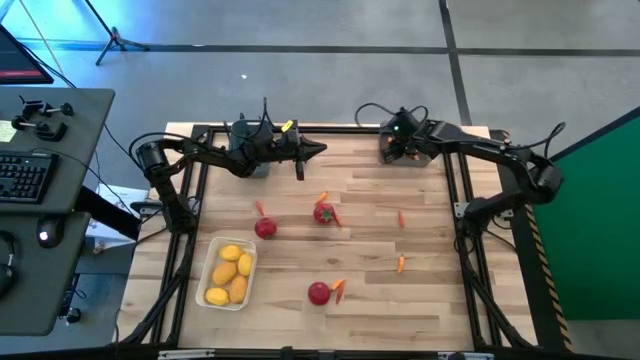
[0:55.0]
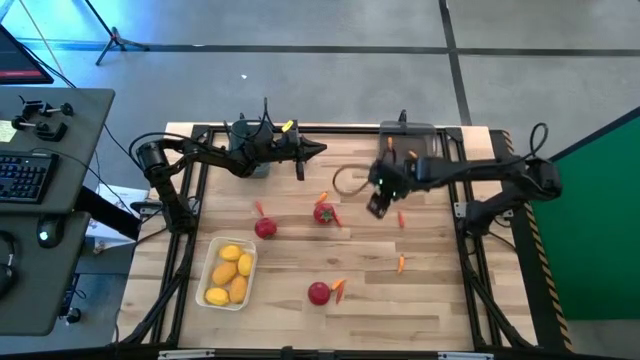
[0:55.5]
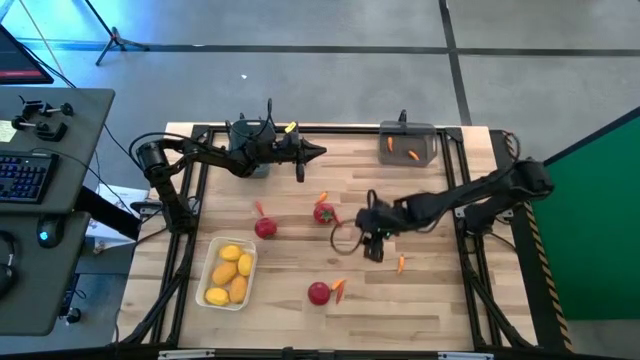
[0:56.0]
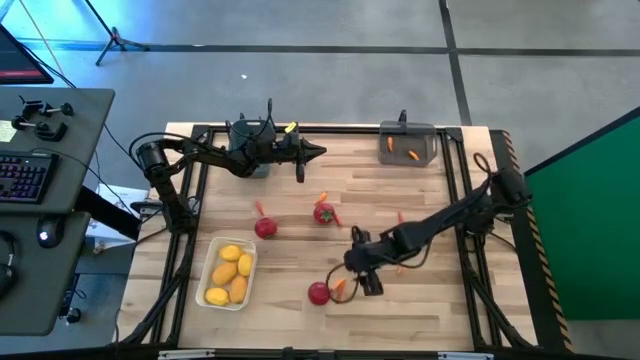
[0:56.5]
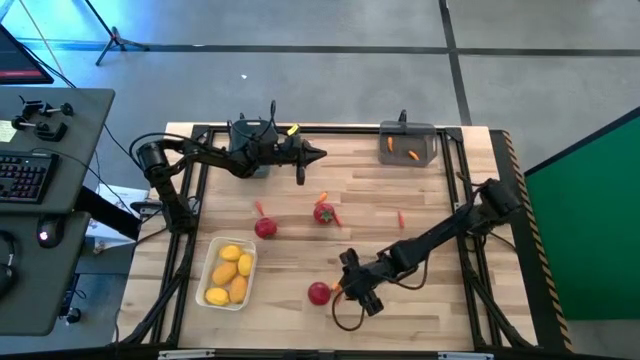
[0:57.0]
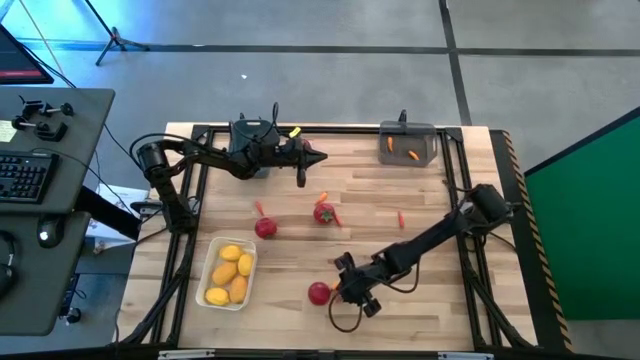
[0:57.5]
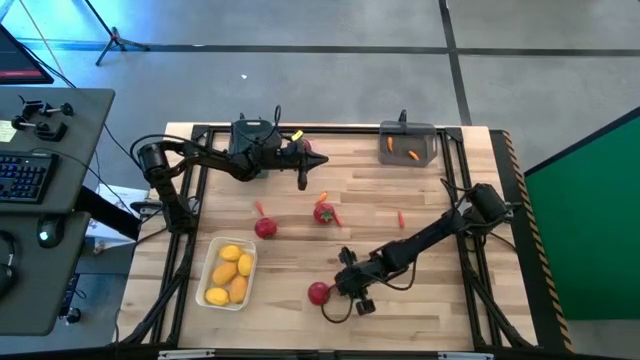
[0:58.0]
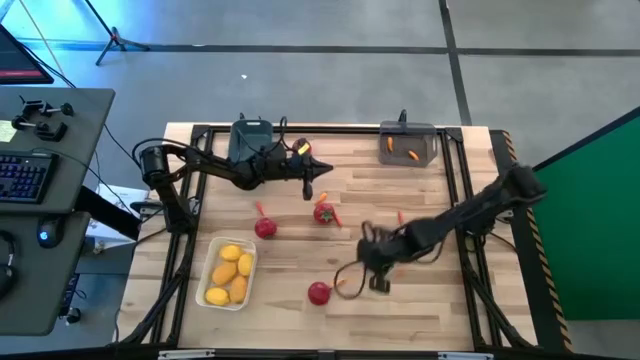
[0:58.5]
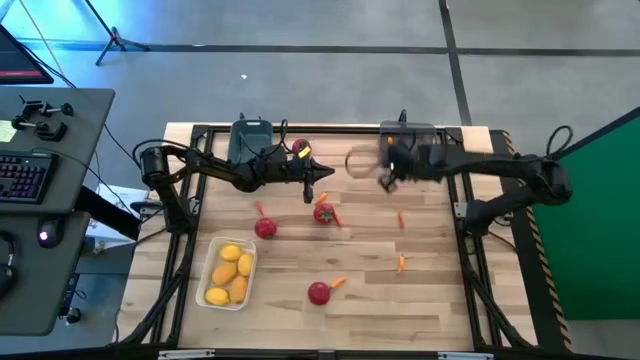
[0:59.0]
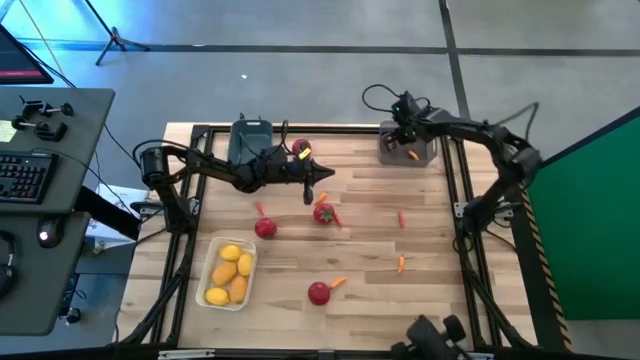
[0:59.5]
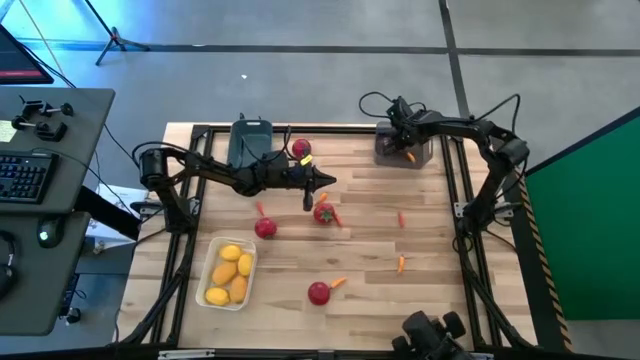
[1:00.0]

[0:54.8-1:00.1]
Task: Sort produce into baskets
Put the red chili pepper into the black bin

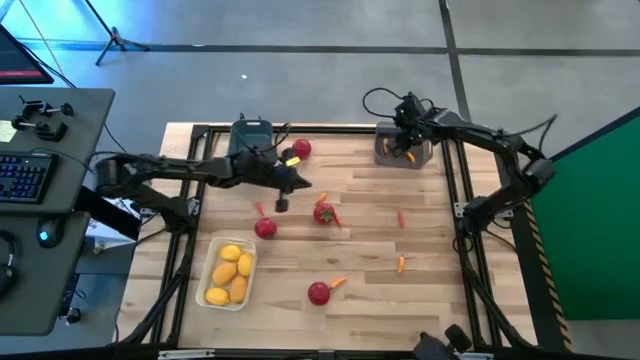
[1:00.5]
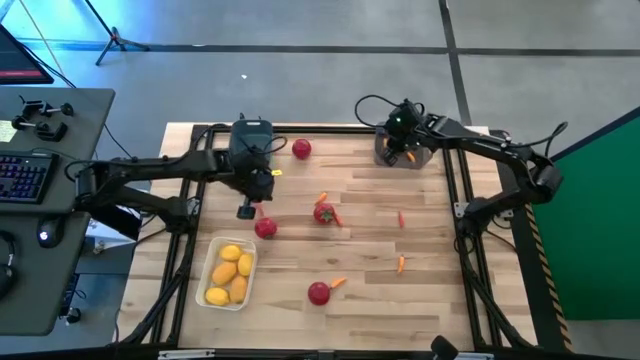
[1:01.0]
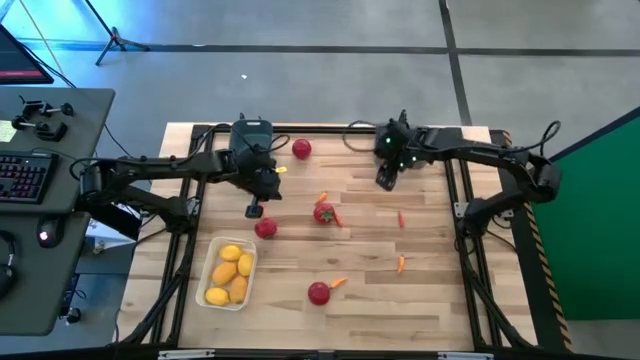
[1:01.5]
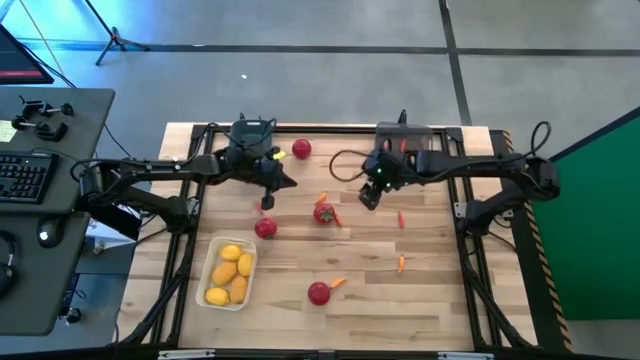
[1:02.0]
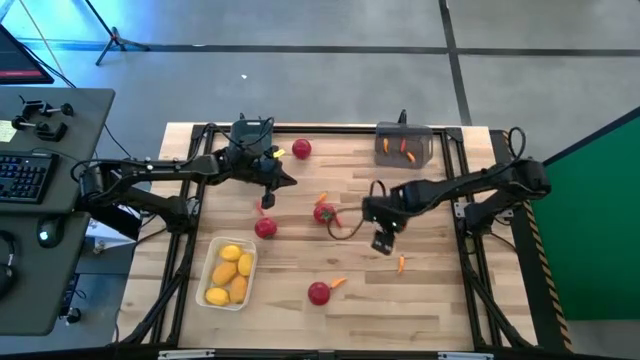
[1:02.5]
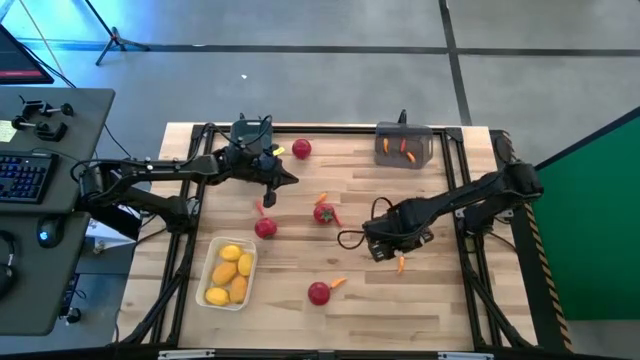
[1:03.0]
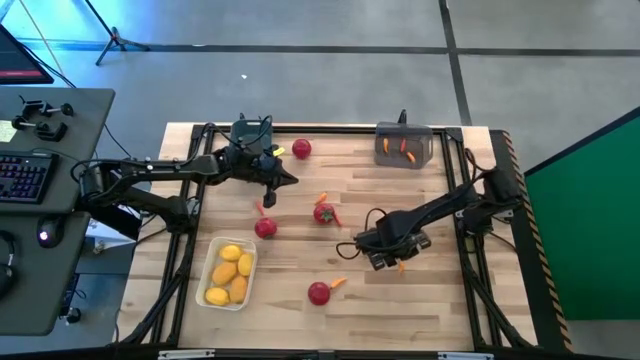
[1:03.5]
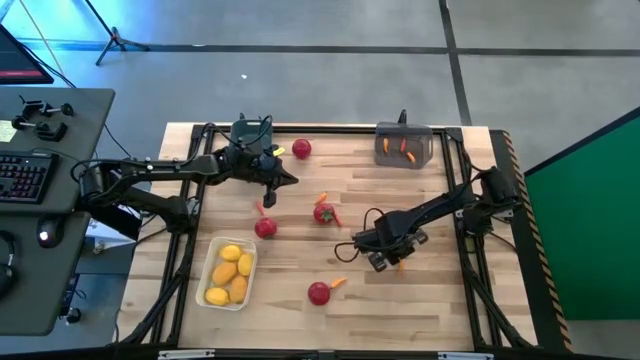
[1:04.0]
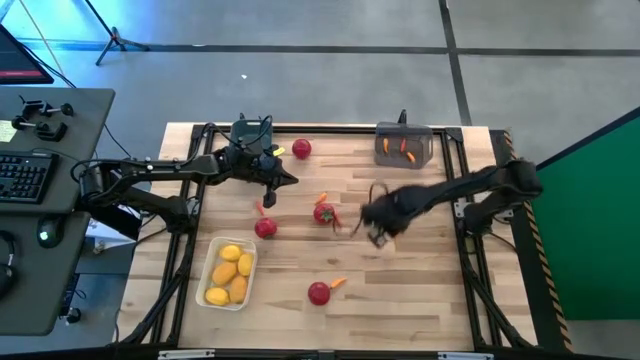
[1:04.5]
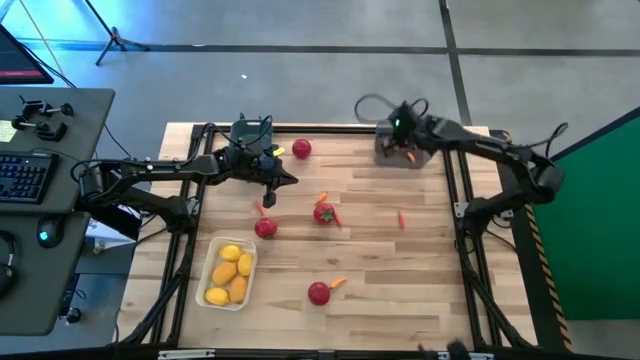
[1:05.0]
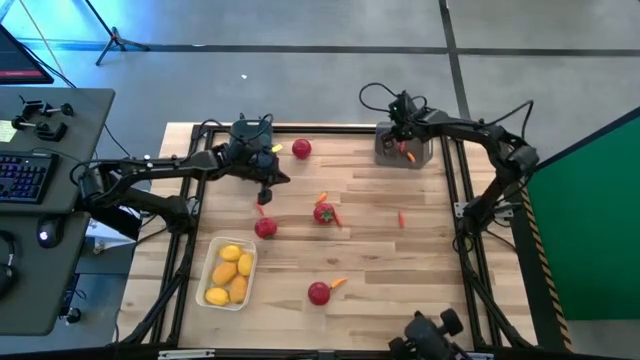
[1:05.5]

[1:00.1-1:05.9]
Put the orange chili pepper into the black bin

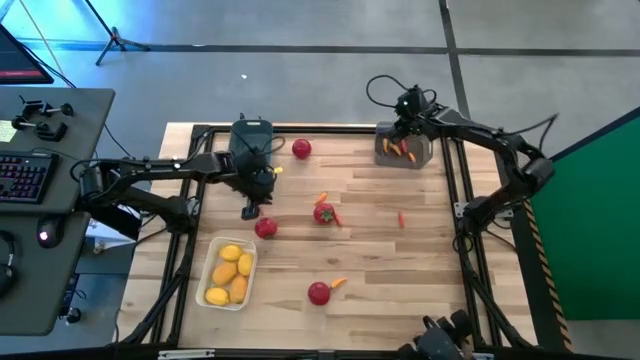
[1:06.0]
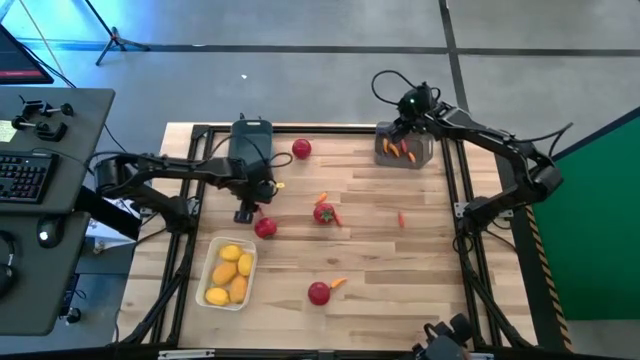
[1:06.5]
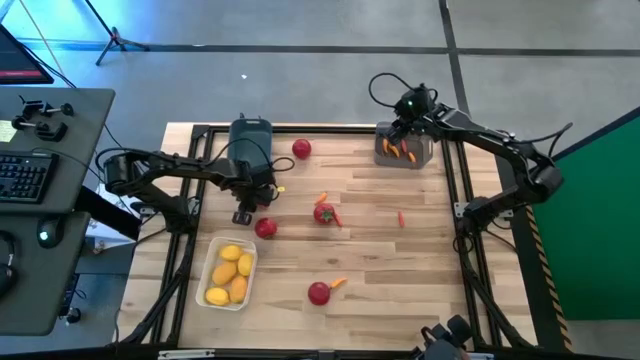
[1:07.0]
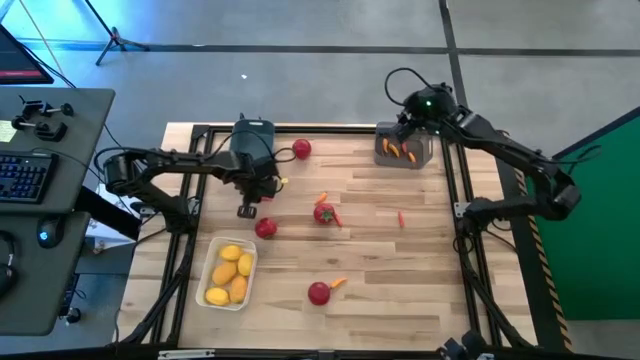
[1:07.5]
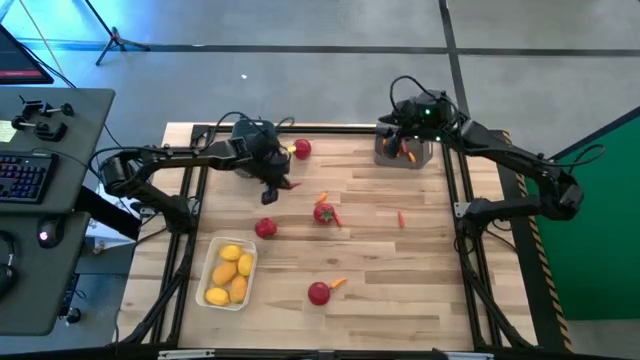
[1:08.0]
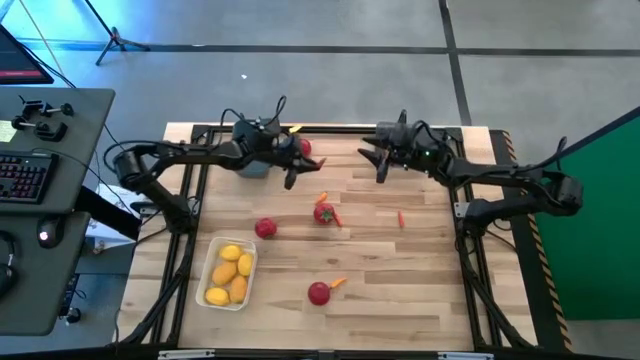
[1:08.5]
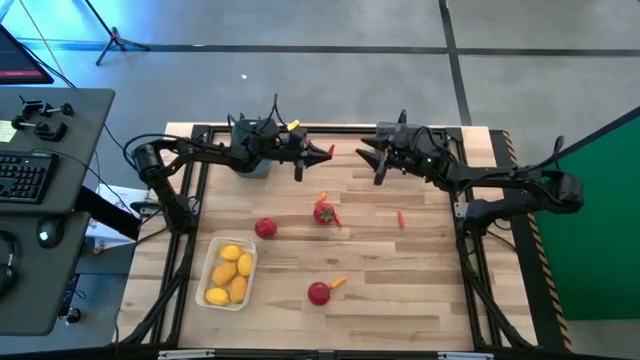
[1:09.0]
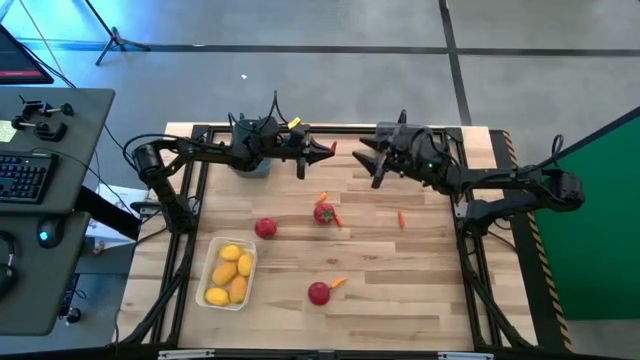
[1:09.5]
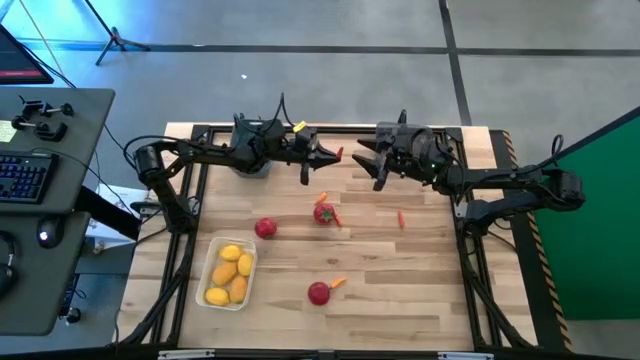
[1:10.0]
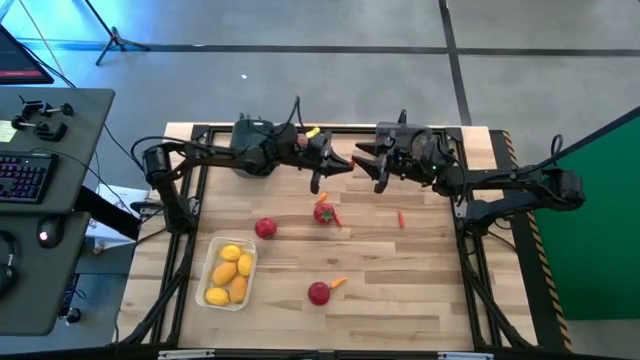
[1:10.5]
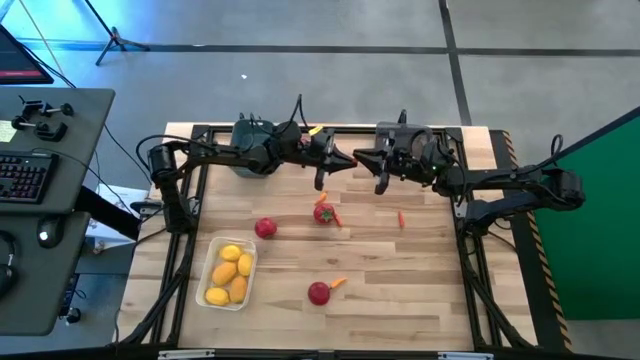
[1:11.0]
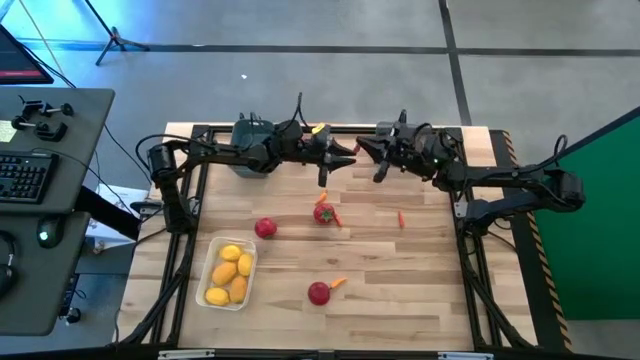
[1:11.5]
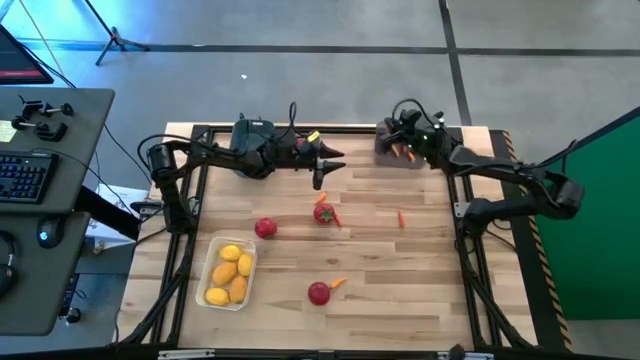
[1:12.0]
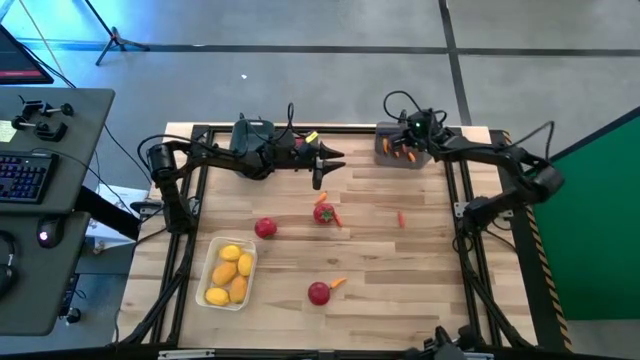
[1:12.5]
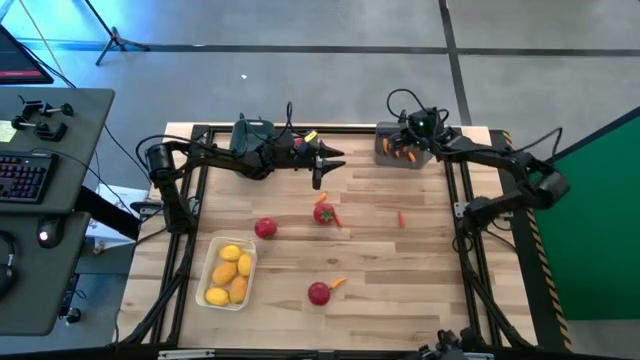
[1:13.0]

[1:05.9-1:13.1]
Put the red chili pepper into the black bin

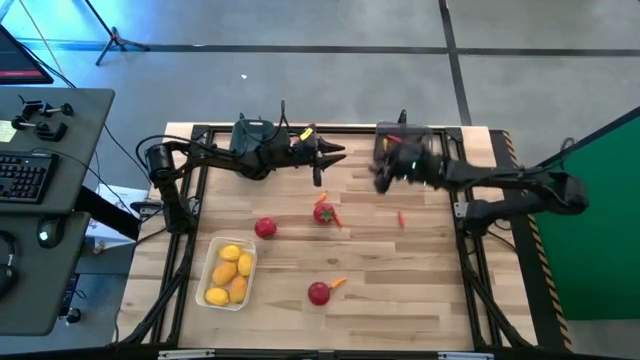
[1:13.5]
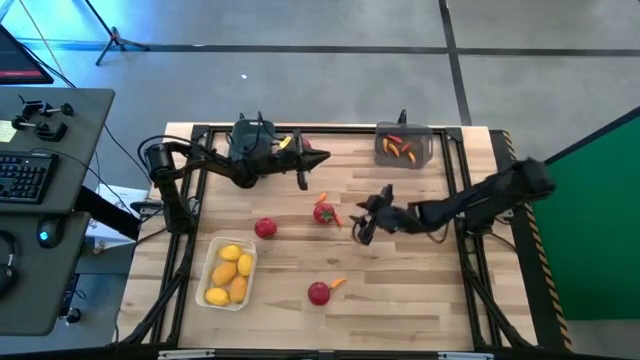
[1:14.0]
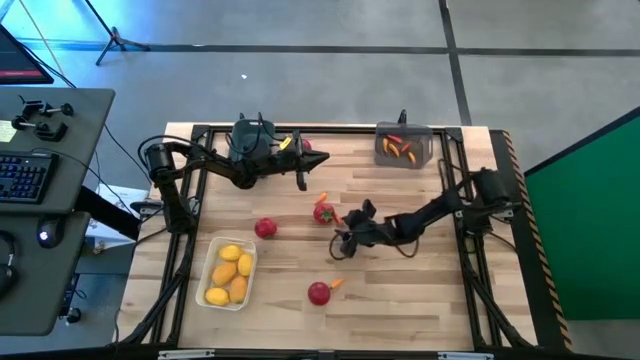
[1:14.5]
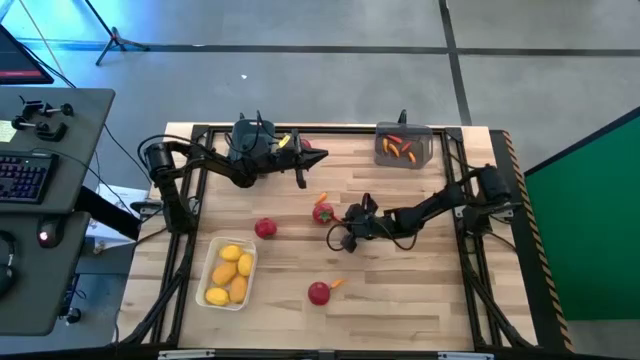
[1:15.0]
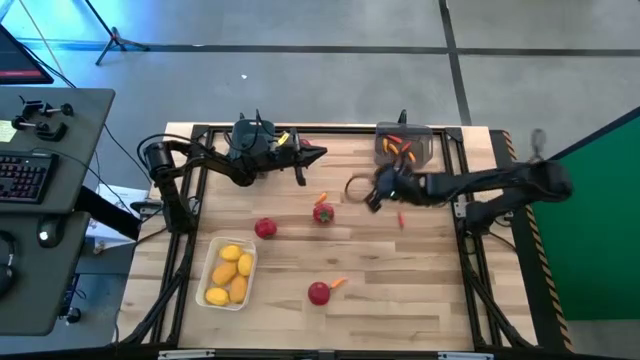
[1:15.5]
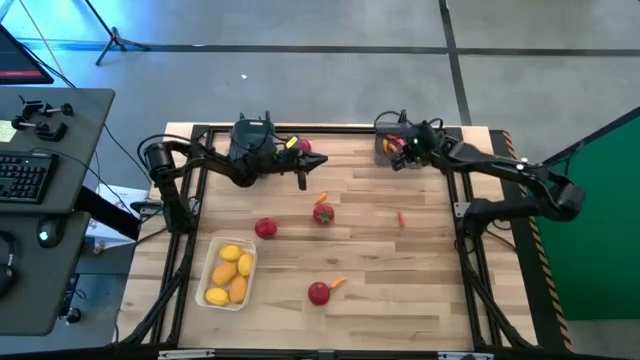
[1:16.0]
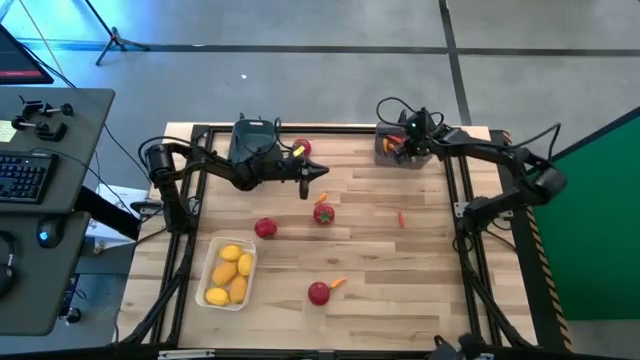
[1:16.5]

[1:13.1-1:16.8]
Put the red chili pepper into the black bin
